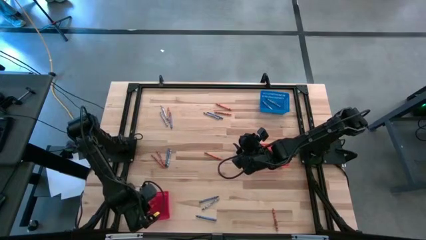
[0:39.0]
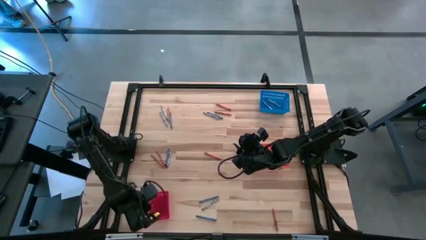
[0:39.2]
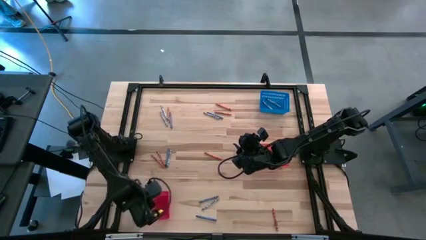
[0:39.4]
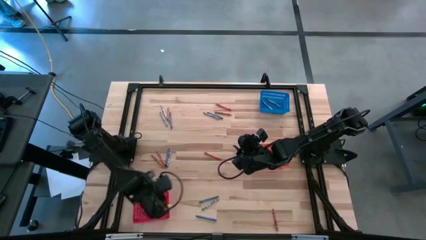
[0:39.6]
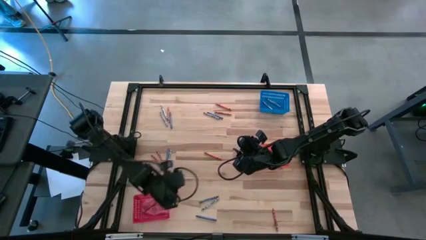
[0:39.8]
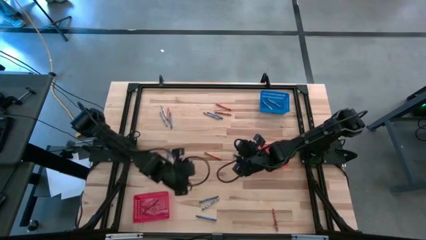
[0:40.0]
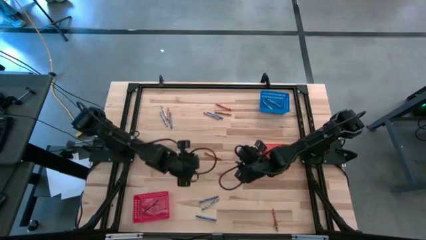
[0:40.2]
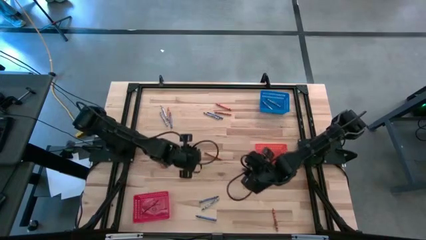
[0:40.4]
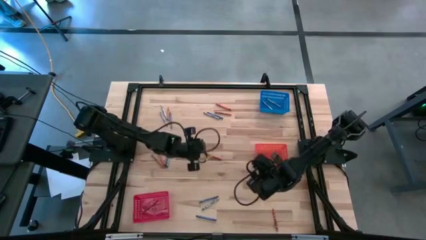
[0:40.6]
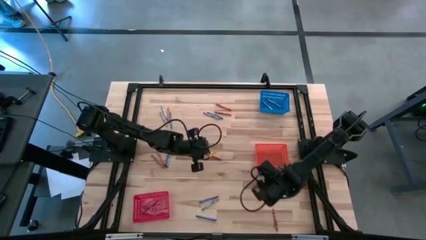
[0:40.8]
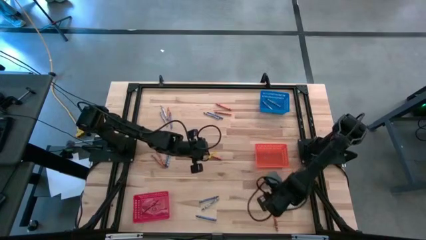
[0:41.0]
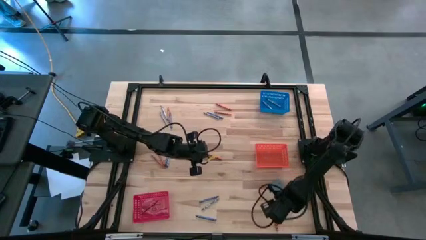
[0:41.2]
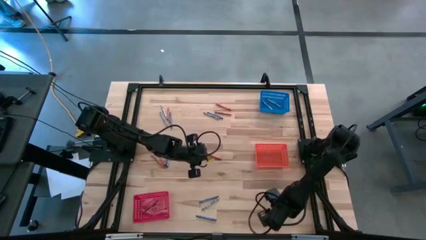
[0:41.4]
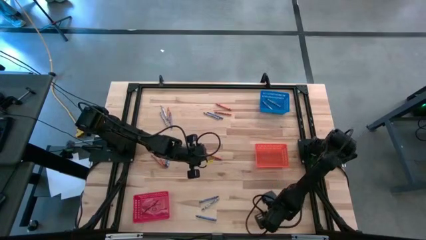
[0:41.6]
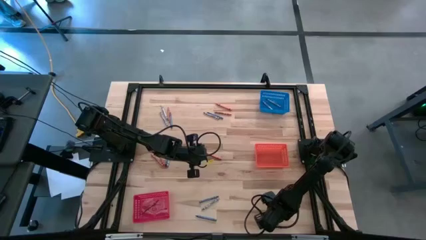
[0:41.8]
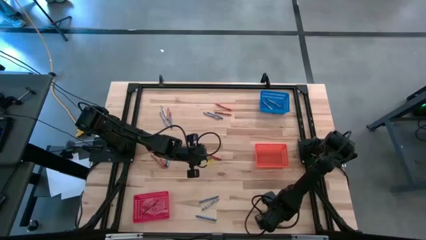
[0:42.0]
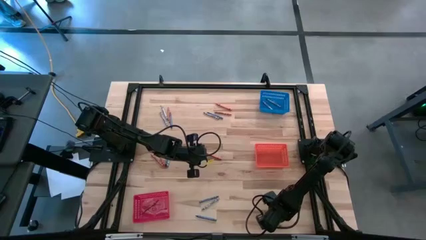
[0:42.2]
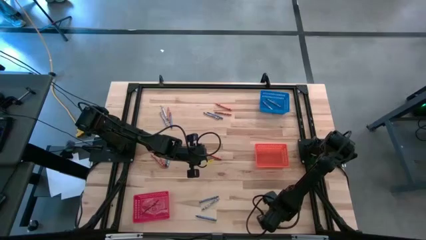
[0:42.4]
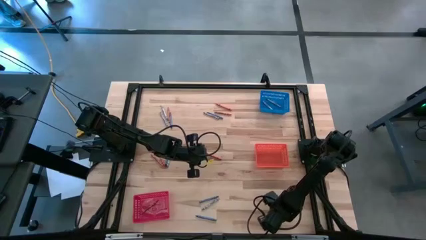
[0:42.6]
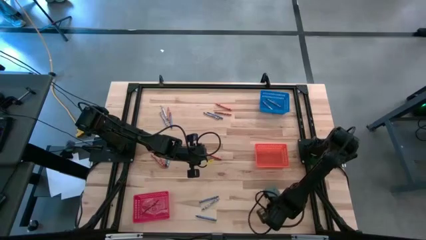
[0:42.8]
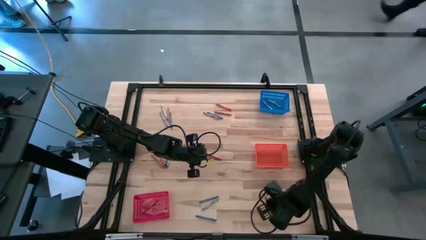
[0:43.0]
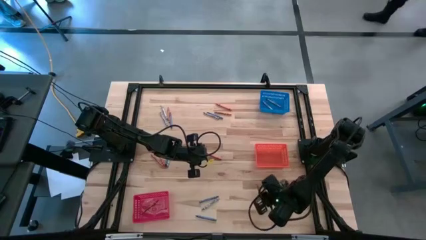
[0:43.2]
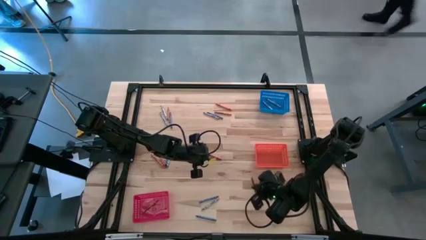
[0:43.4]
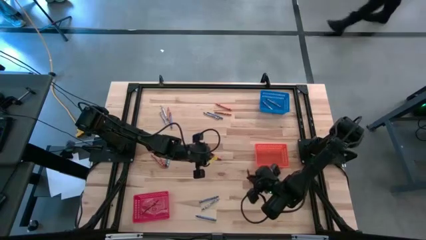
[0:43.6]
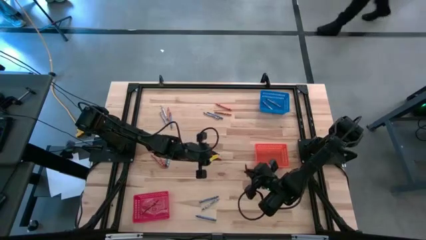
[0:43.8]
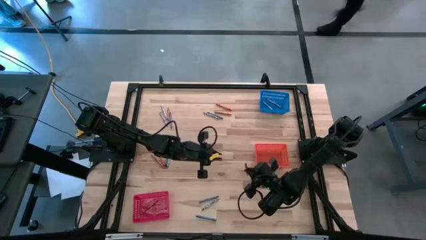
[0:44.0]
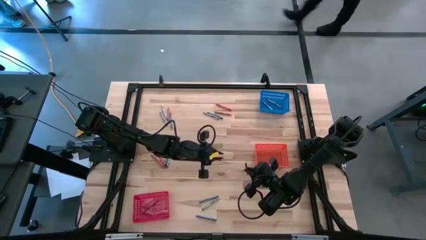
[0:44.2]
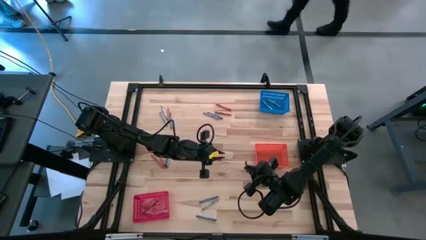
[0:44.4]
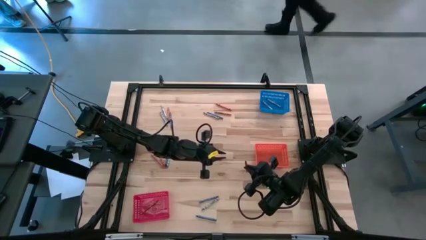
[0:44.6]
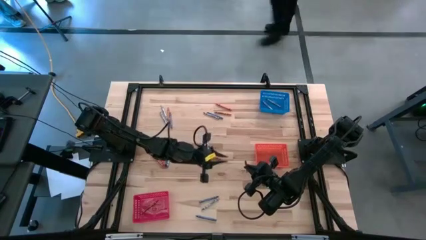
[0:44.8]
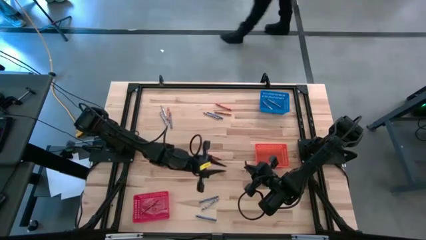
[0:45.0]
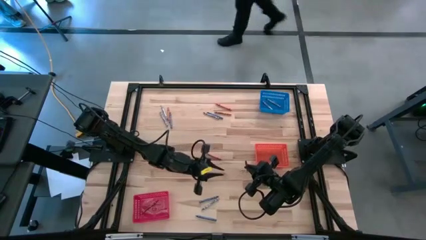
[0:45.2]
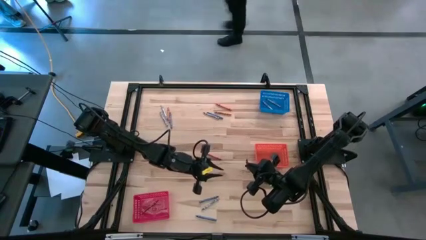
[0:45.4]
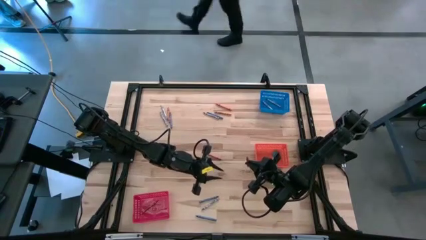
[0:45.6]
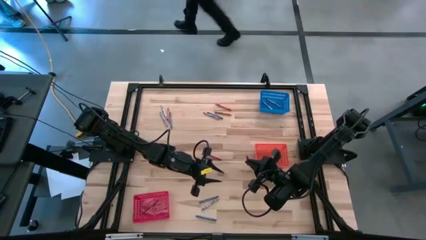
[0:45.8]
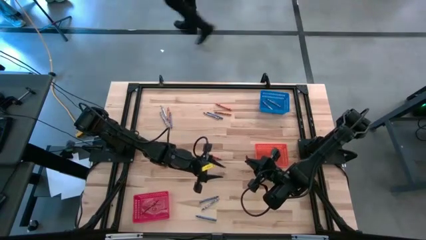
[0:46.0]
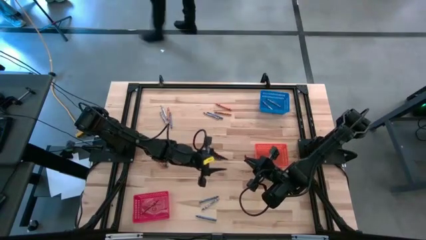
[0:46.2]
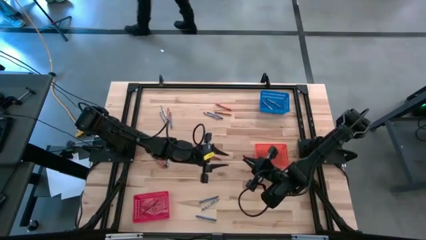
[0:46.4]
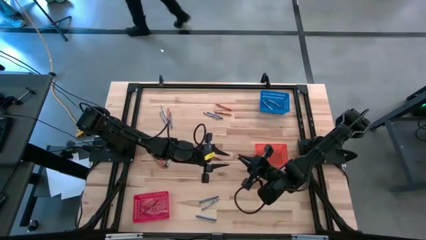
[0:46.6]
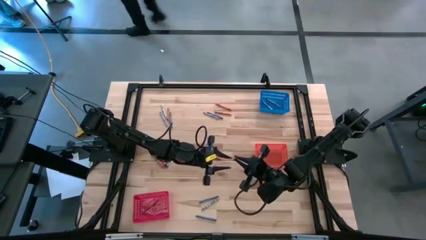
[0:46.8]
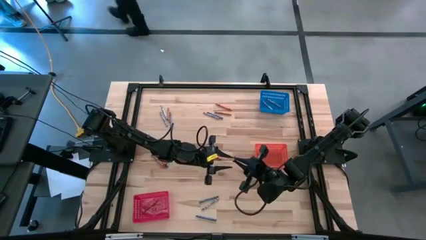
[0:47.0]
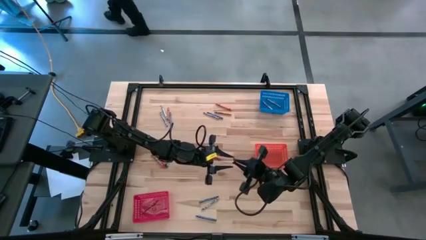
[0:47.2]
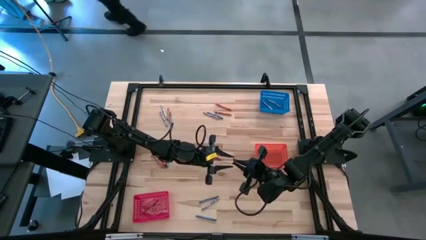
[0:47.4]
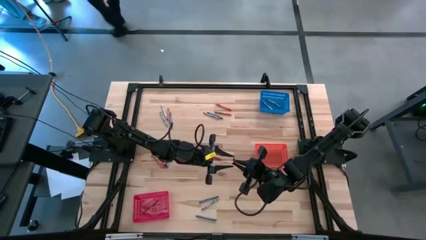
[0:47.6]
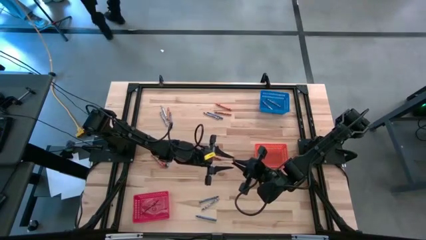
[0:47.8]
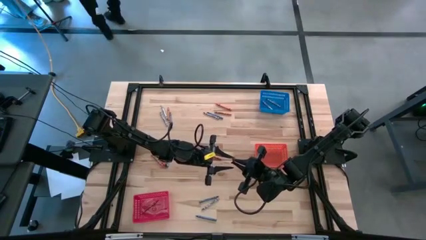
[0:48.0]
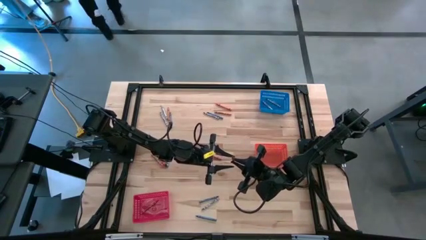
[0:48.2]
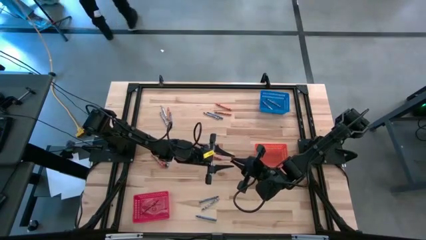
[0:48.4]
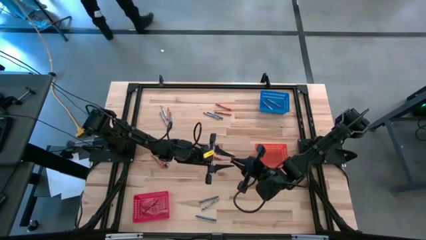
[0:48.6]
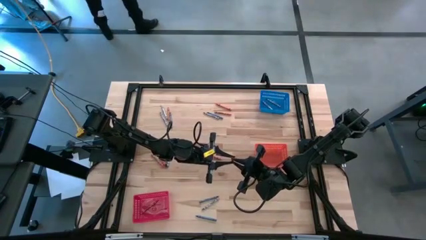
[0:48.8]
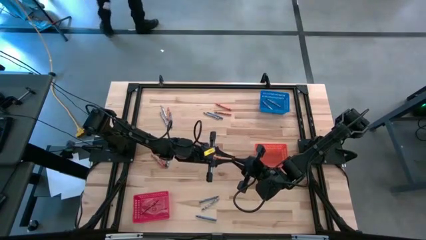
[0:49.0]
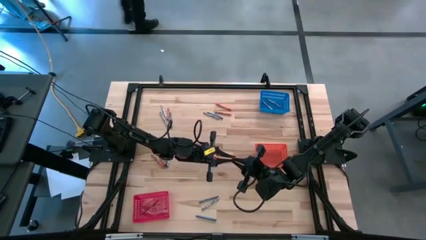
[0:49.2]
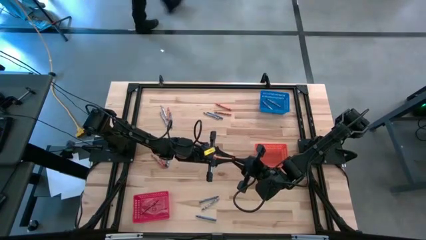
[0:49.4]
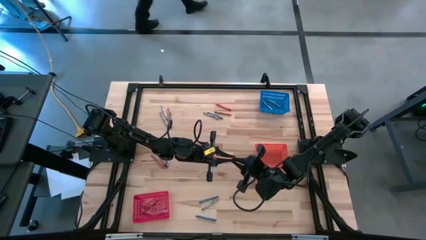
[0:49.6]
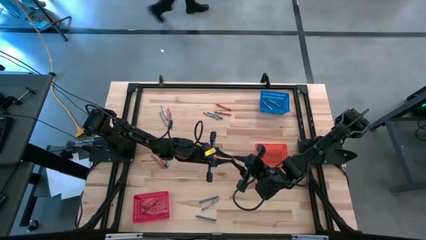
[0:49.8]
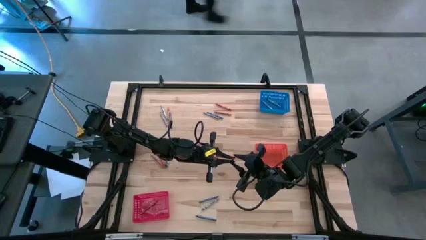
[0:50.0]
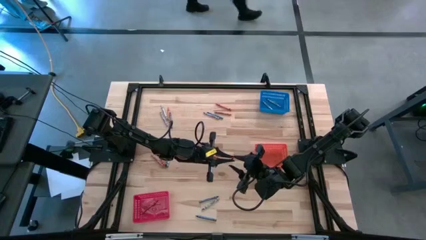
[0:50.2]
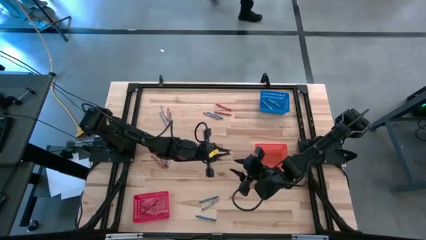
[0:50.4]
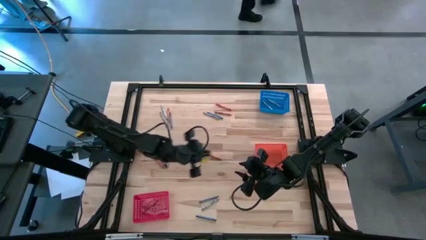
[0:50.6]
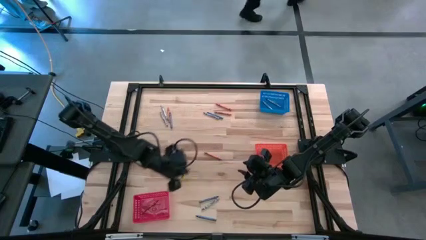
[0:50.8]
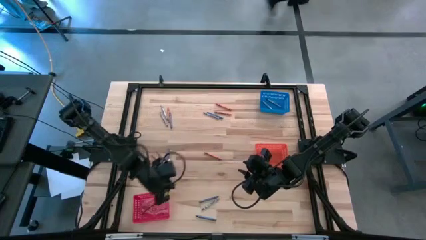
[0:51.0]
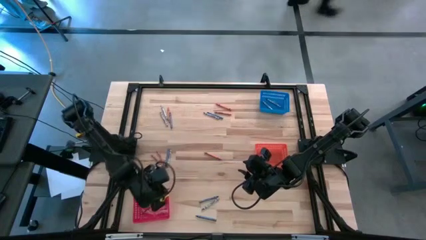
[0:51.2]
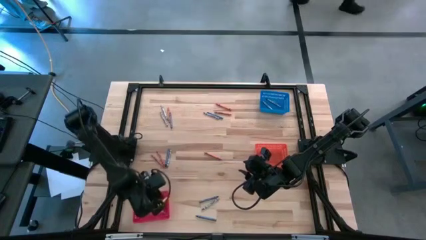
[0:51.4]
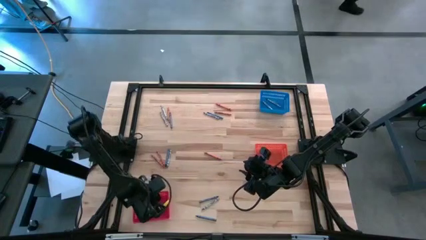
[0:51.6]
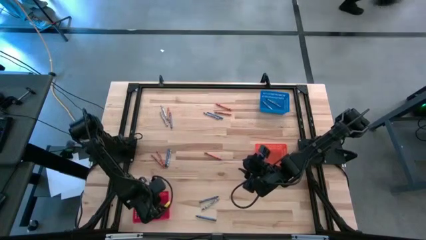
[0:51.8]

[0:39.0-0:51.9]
Task: Sort crayons
Put the orange crayon into the red bin

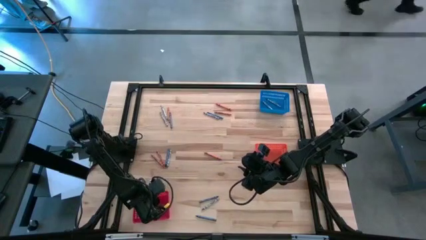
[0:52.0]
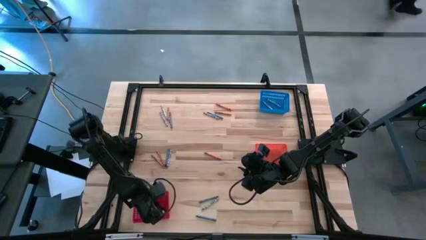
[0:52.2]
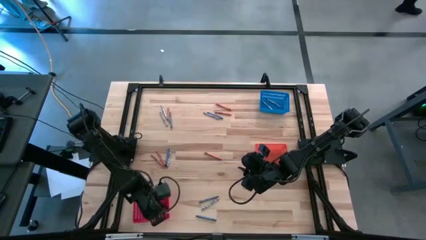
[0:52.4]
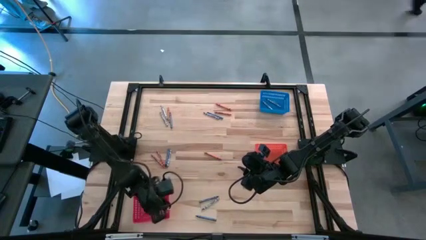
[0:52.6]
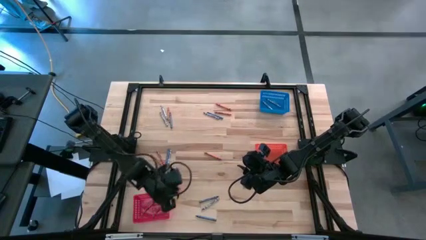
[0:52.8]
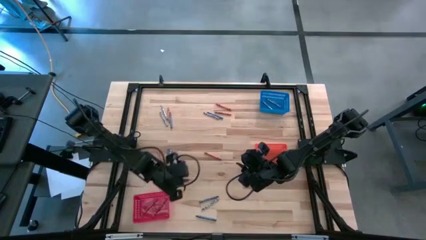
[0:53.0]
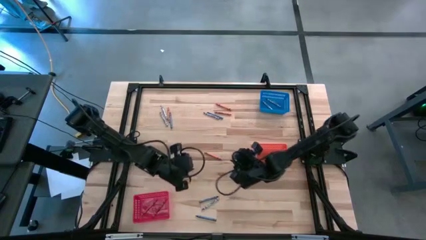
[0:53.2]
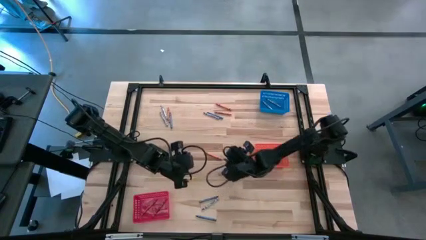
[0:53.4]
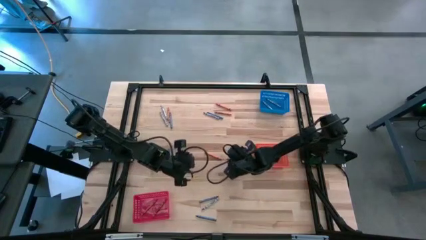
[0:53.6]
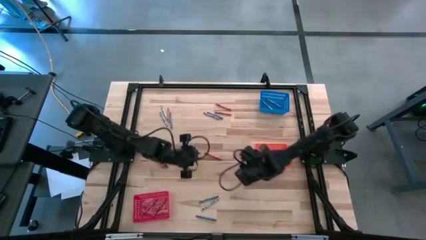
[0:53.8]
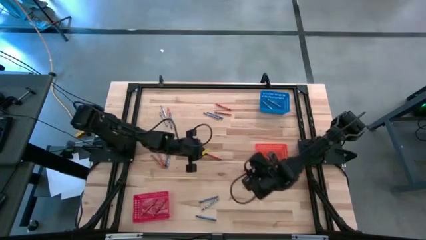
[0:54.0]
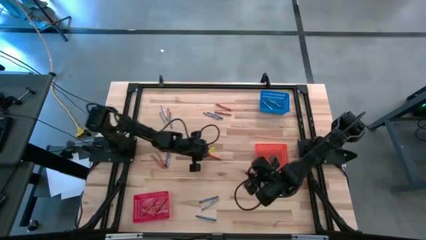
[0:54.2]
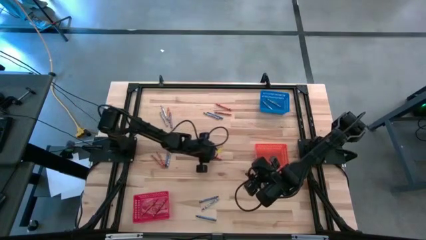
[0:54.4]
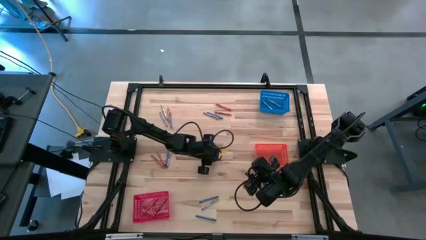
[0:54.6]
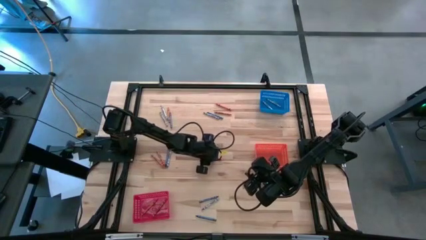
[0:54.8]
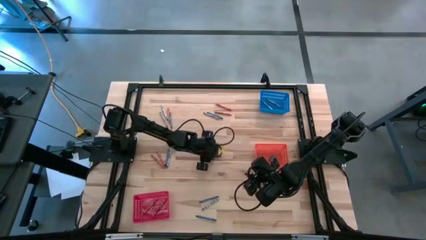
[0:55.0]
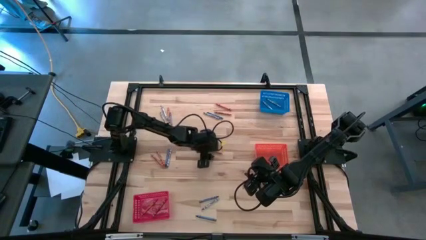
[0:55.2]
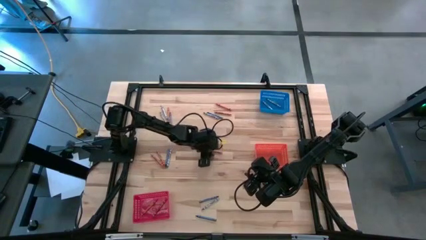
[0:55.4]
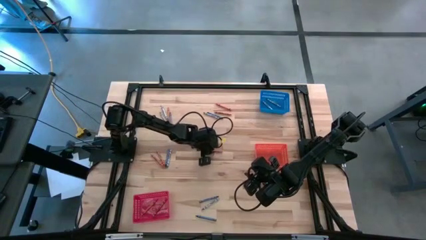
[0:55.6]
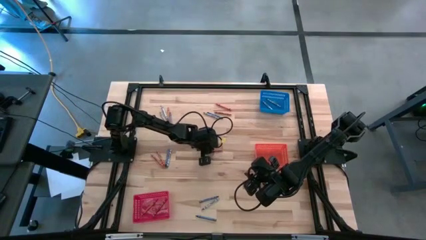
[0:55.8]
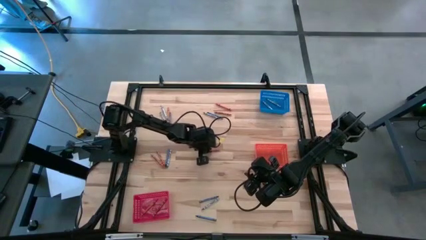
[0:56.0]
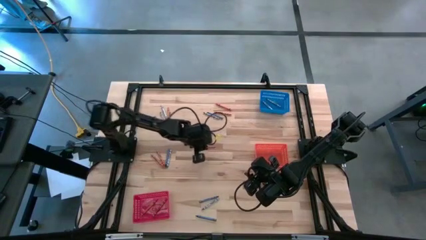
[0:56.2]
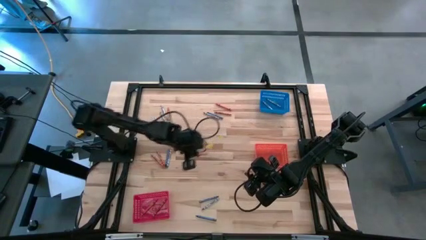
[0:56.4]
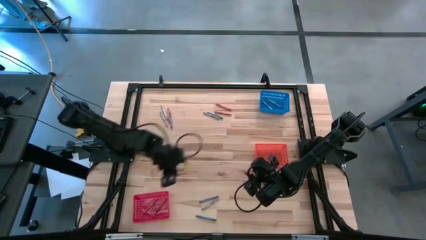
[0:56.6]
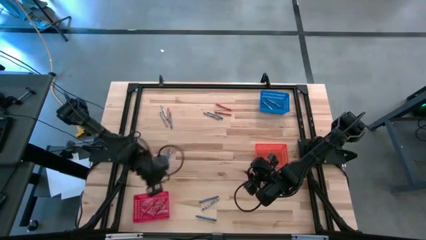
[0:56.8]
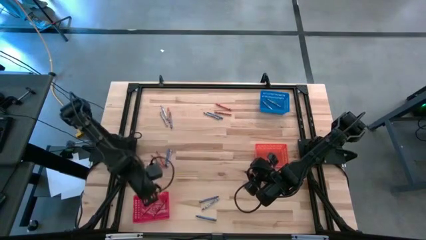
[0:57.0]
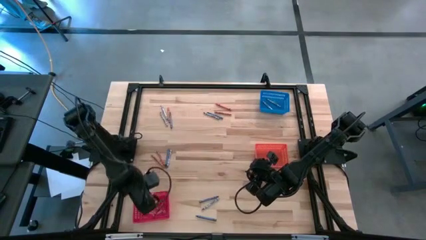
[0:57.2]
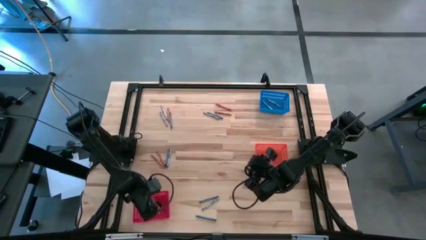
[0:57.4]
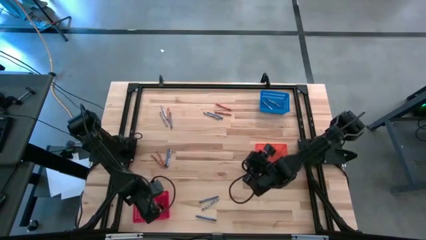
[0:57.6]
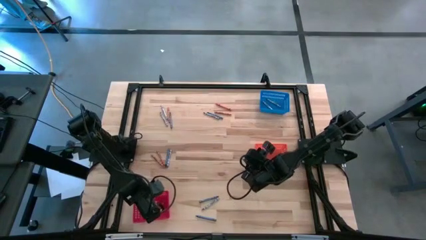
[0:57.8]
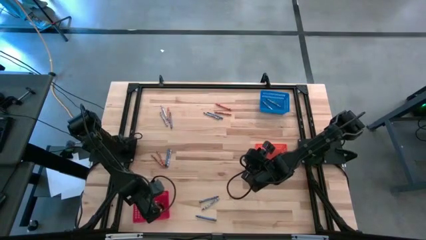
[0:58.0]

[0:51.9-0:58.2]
Put the orange crayon into the red bin
